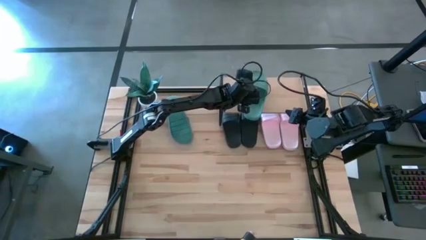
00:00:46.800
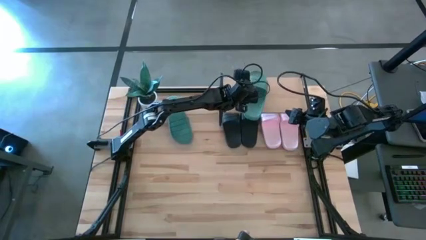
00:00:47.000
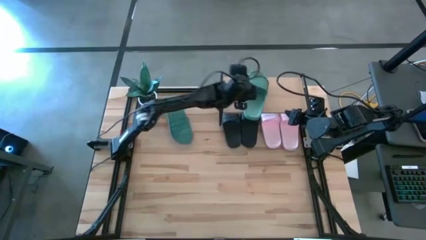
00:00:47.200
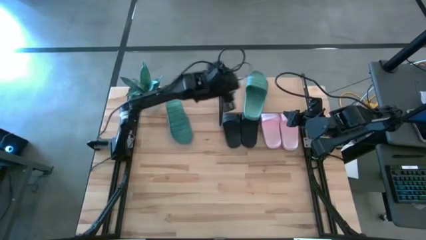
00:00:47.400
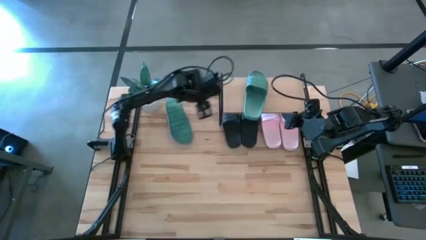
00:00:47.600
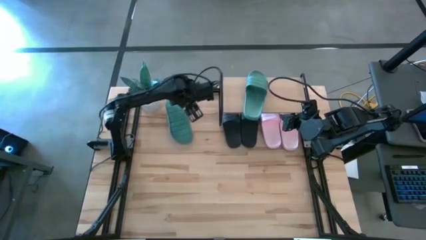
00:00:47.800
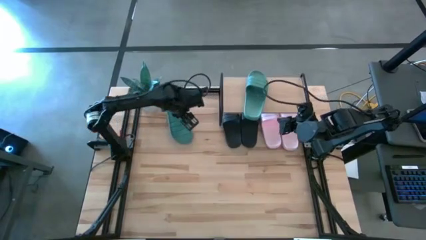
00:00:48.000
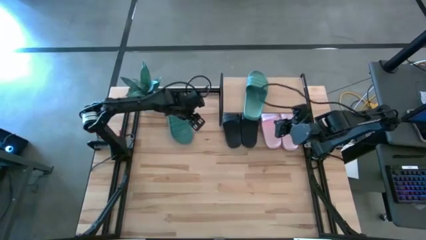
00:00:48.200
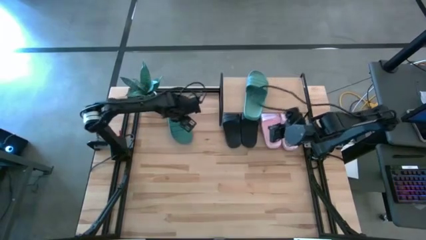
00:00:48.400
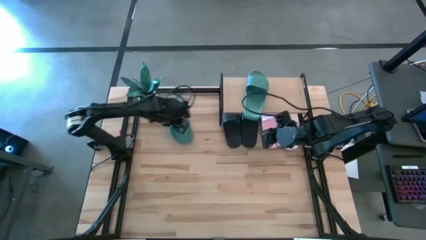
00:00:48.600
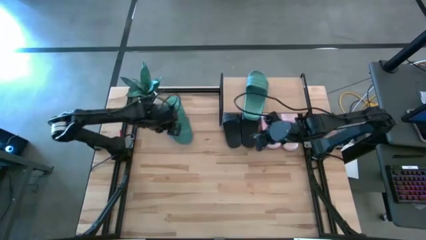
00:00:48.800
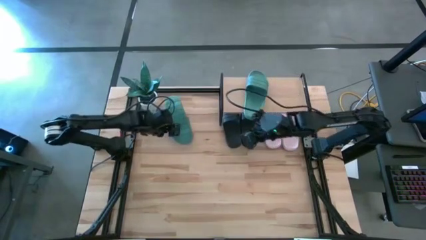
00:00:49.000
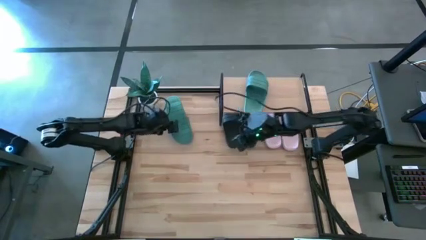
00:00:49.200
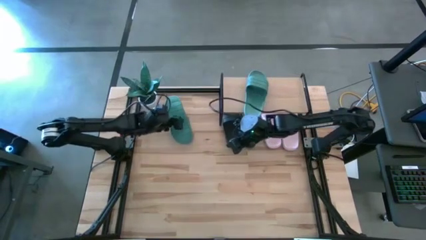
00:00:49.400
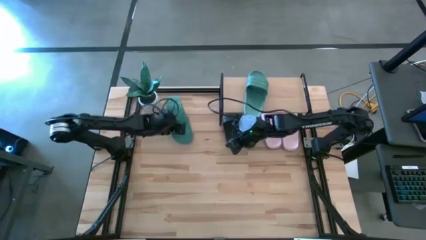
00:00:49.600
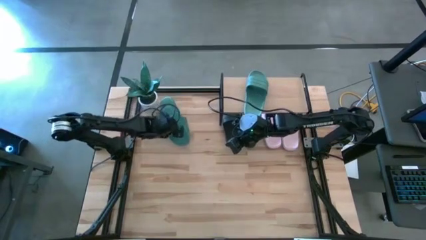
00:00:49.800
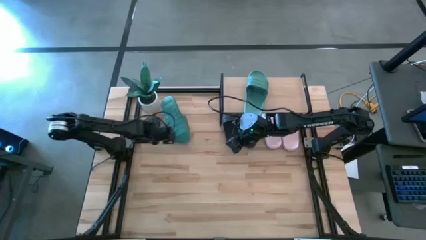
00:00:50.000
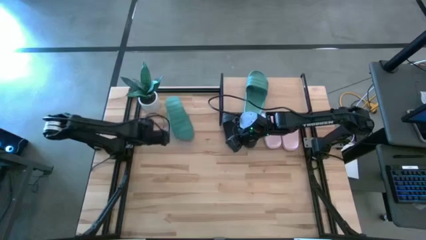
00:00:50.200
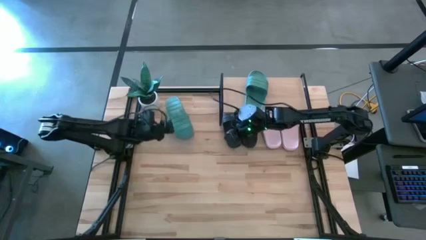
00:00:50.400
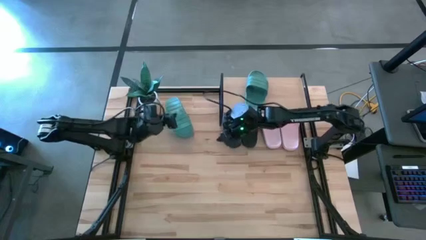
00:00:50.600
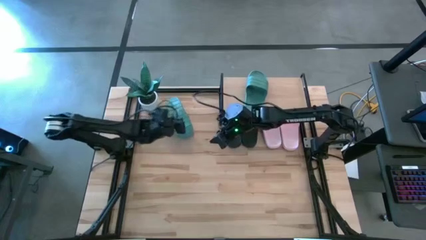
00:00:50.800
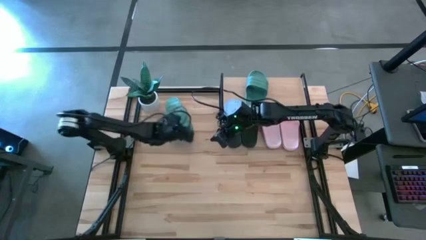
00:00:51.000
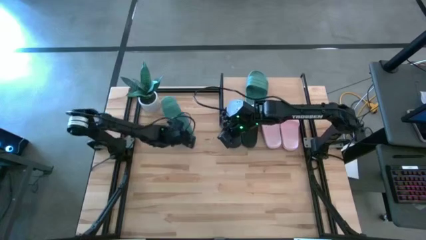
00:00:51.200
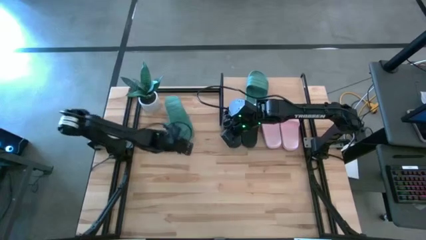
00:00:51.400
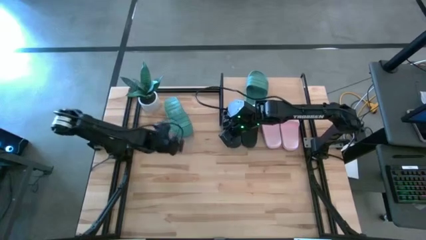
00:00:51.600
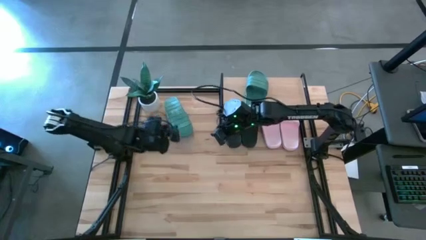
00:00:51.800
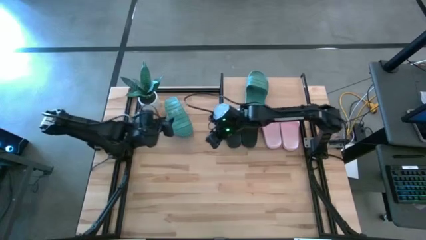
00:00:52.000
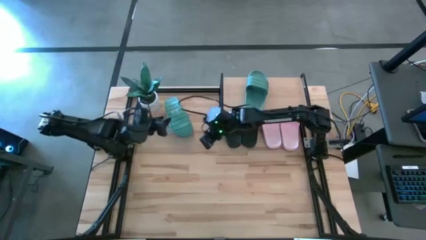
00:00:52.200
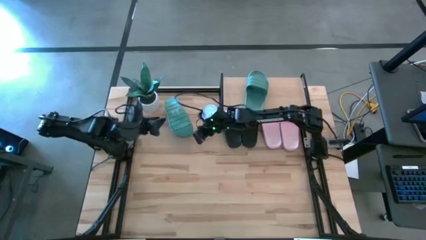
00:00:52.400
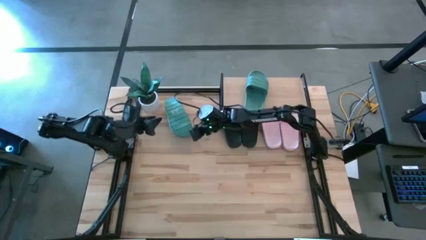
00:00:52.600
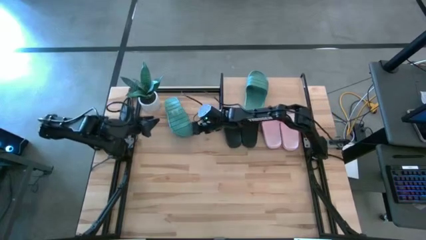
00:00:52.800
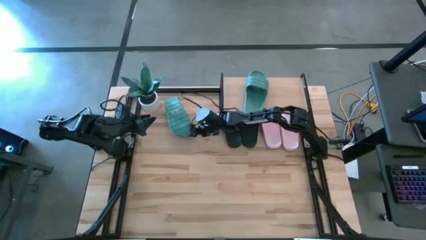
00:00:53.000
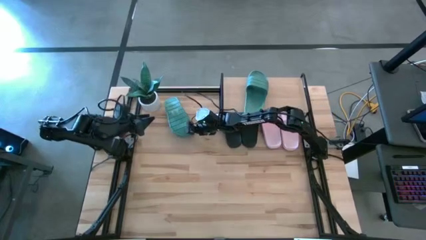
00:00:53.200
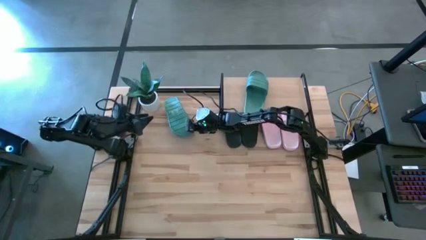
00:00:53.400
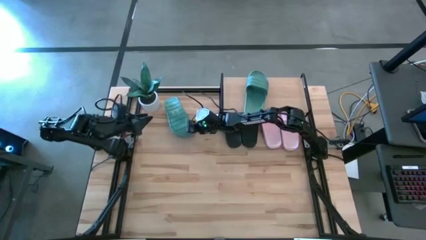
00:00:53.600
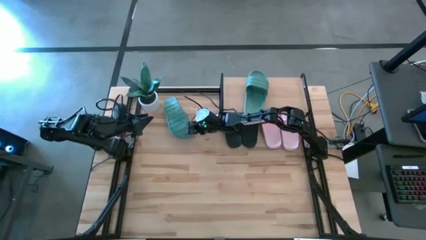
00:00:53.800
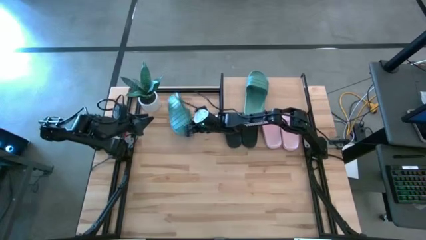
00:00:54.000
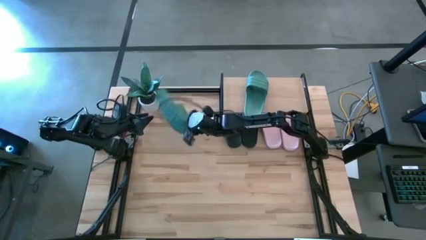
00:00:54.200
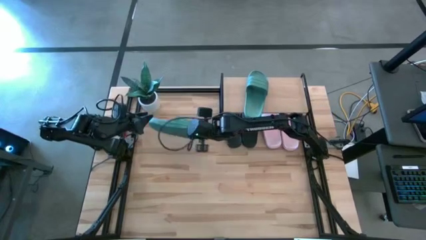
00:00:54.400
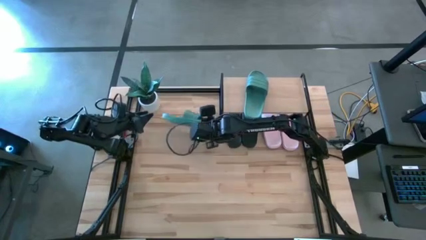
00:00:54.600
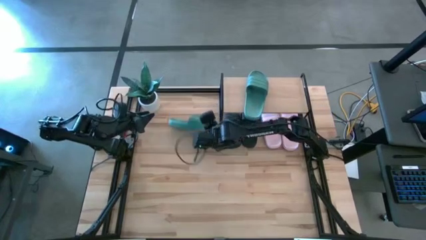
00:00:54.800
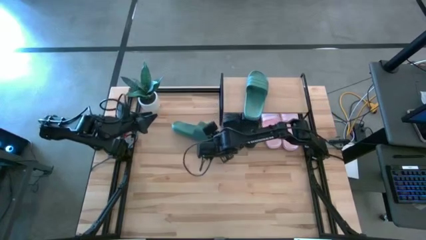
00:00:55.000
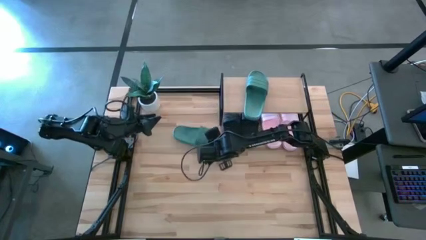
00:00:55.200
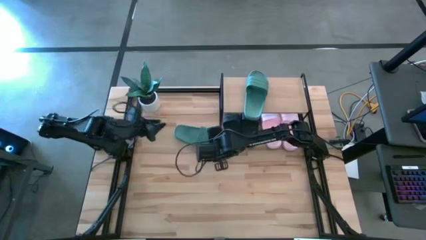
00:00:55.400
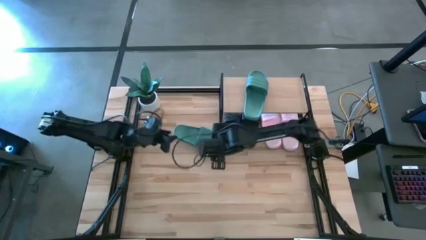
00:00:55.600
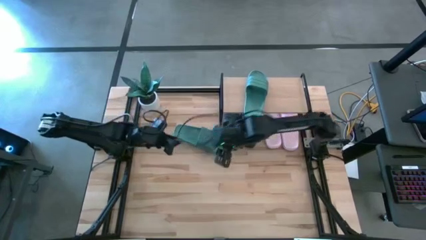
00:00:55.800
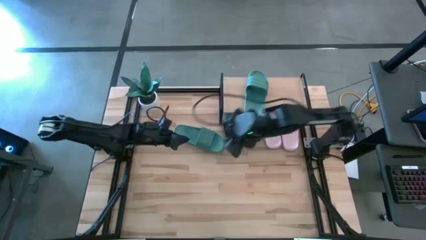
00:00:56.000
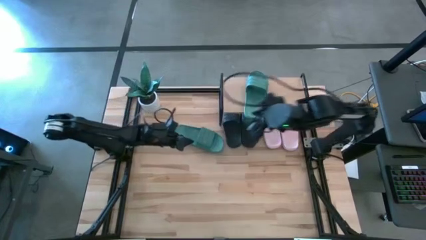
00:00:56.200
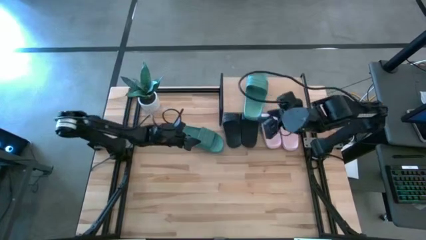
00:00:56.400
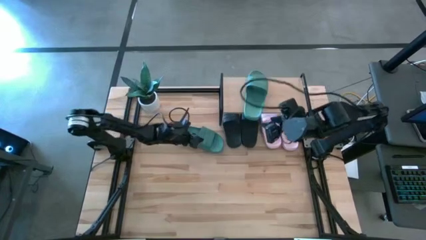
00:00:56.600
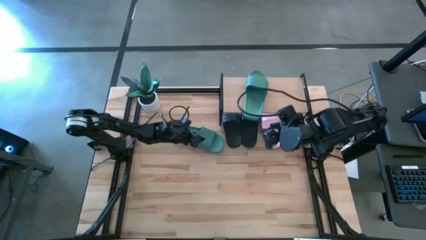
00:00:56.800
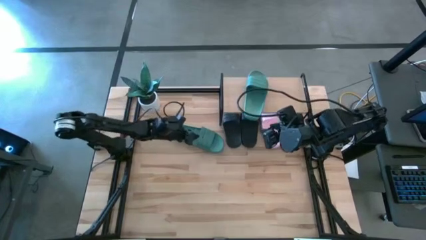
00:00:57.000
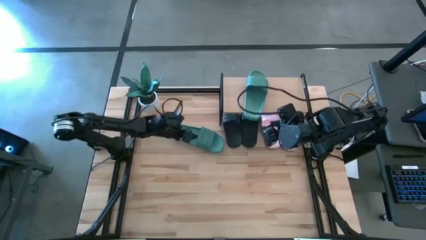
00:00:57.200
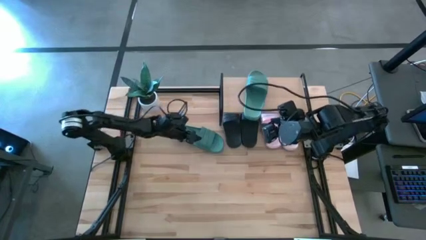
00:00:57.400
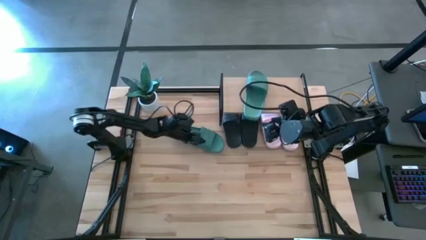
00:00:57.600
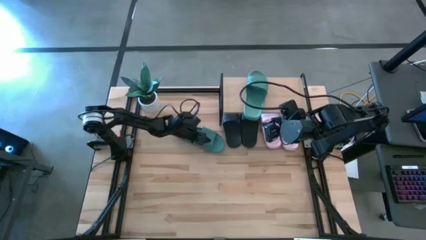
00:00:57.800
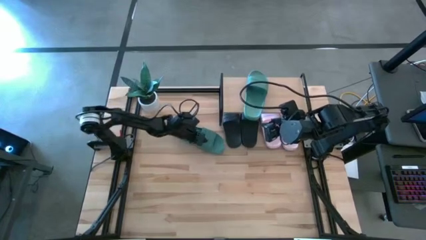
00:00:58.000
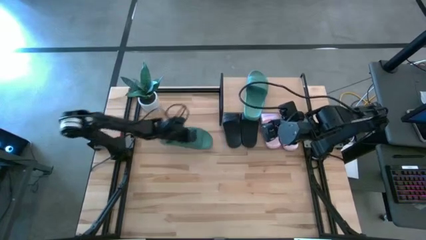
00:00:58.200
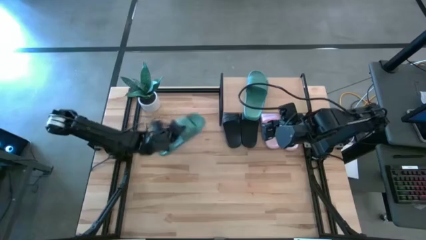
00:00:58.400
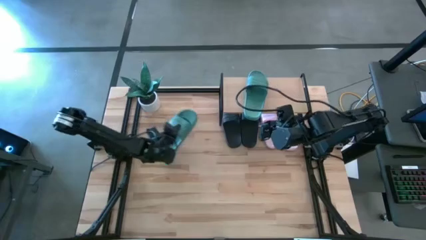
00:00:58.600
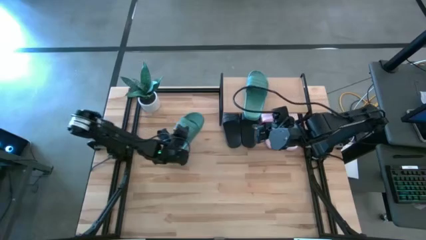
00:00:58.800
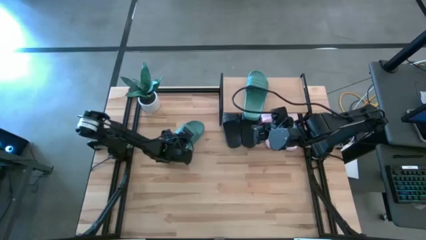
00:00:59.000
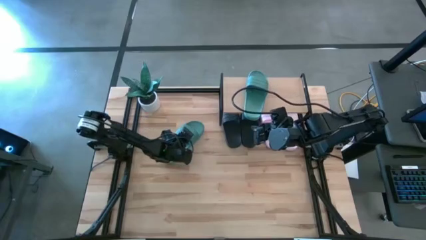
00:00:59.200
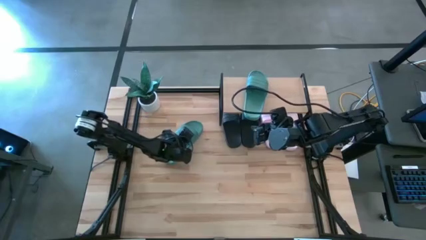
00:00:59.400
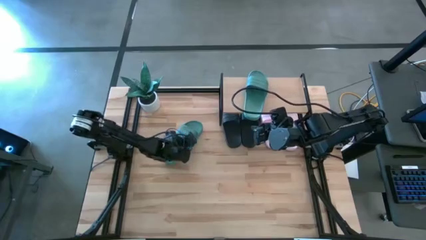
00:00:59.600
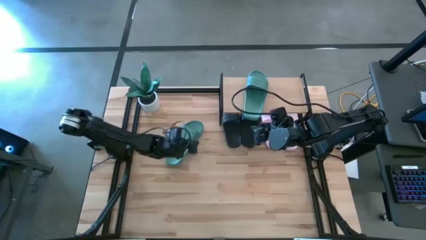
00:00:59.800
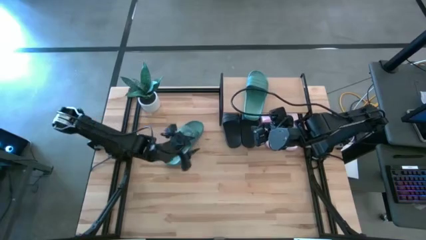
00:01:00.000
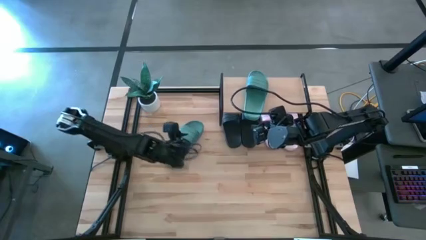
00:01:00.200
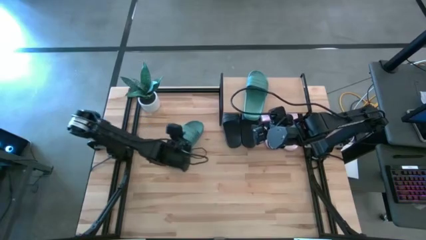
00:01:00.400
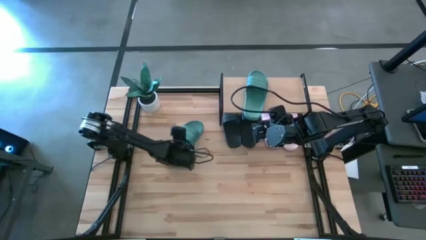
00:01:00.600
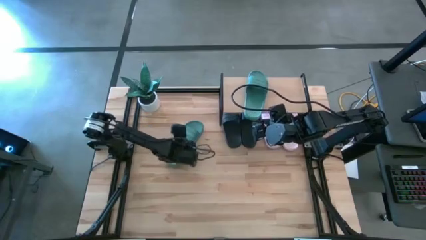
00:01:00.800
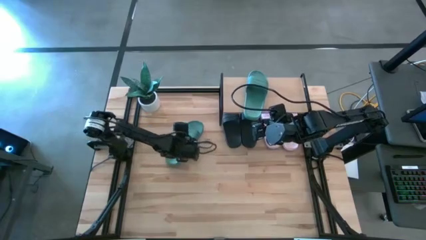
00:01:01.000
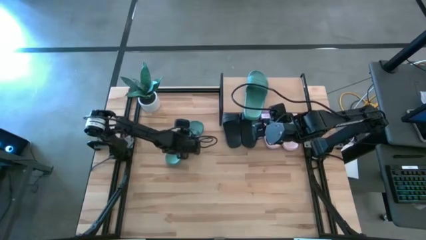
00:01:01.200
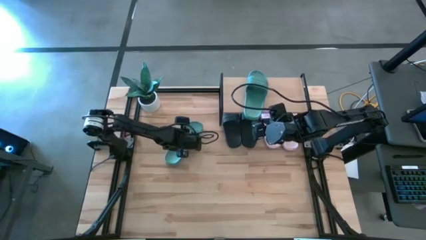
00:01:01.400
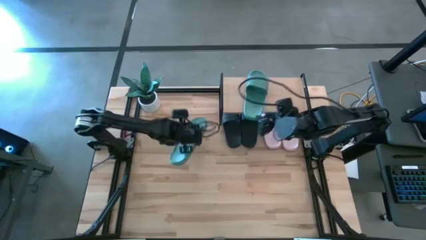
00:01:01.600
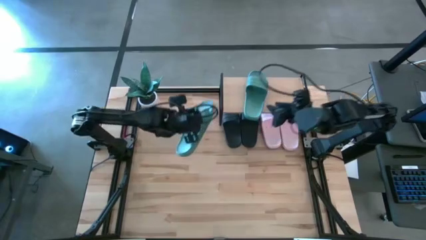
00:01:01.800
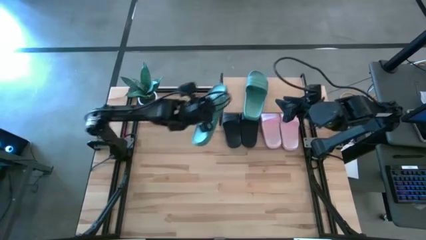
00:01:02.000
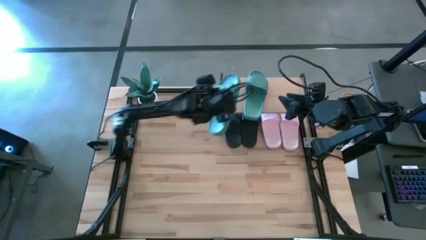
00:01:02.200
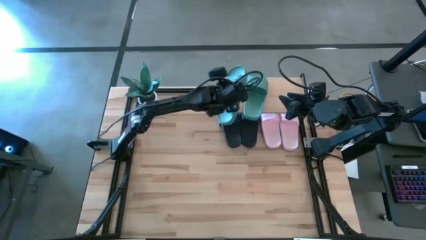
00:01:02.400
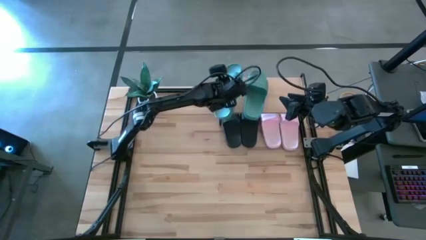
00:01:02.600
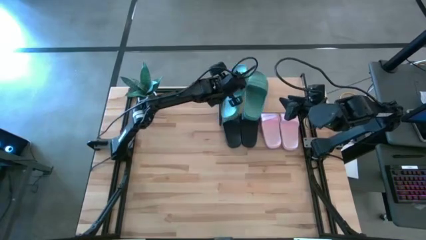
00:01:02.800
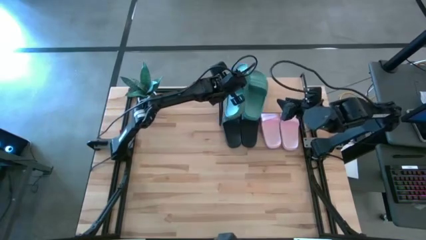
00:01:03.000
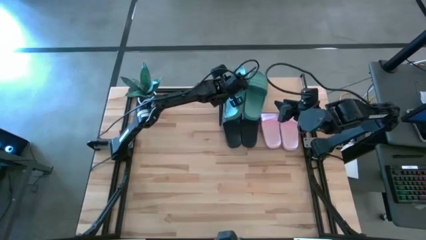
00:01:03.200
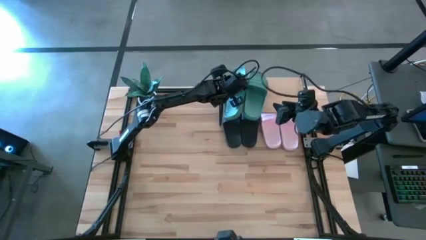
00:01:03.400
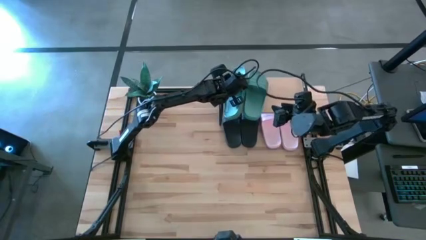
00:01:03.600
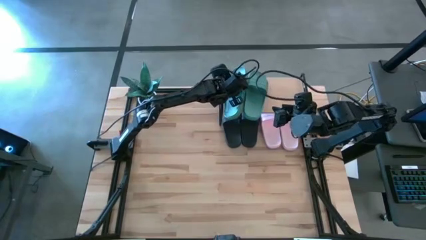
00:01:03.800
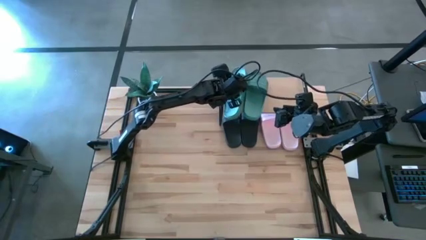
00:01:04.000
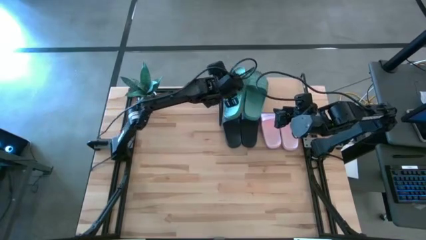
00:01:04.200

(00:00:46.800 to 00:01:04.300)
Task: Pick and place slides into the shelf
Put the green slide on the shelf
